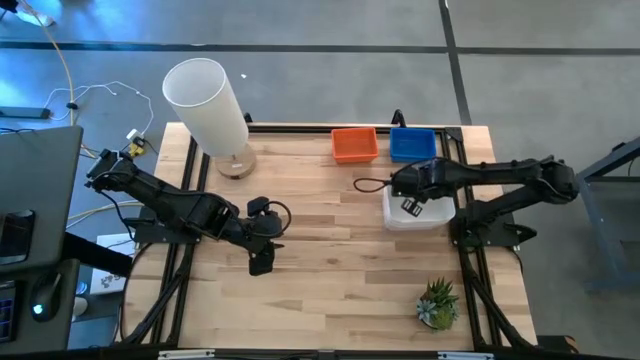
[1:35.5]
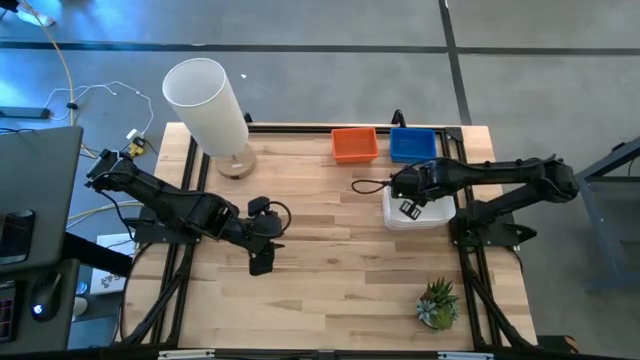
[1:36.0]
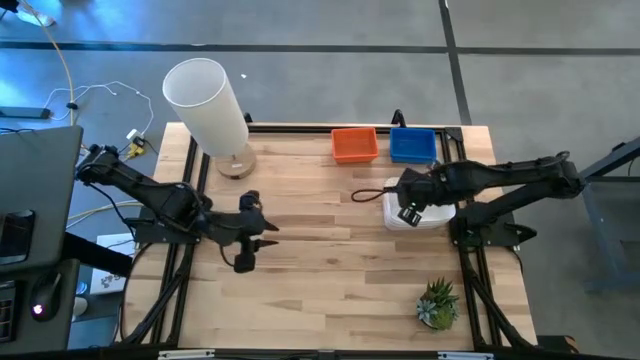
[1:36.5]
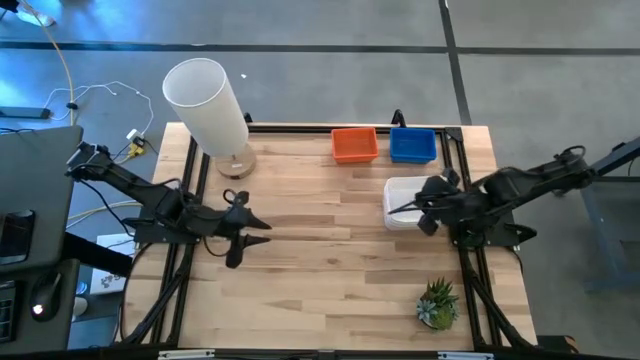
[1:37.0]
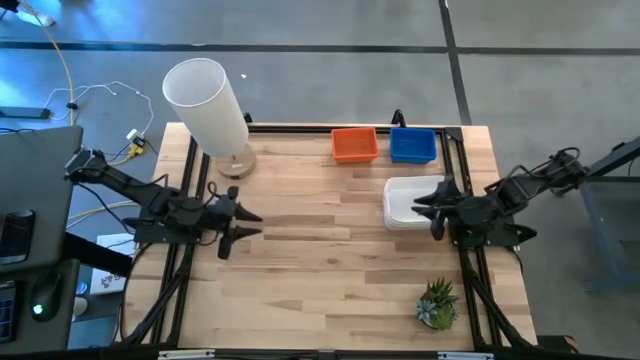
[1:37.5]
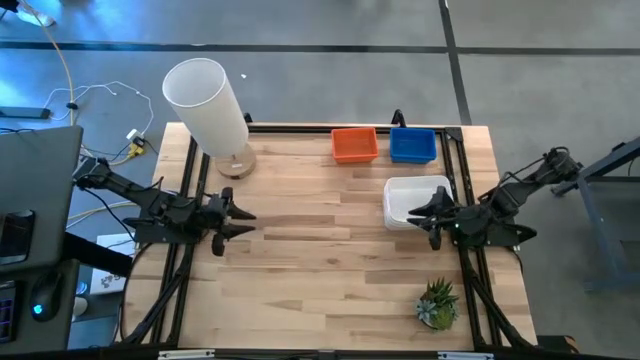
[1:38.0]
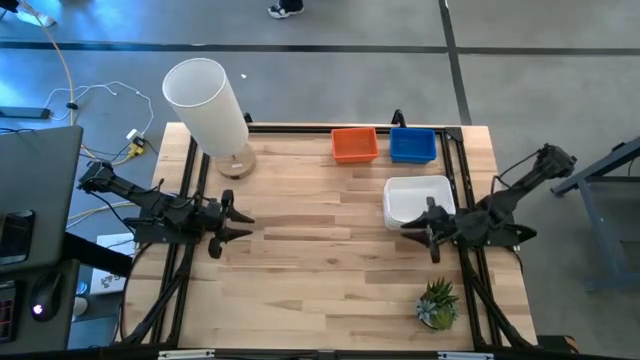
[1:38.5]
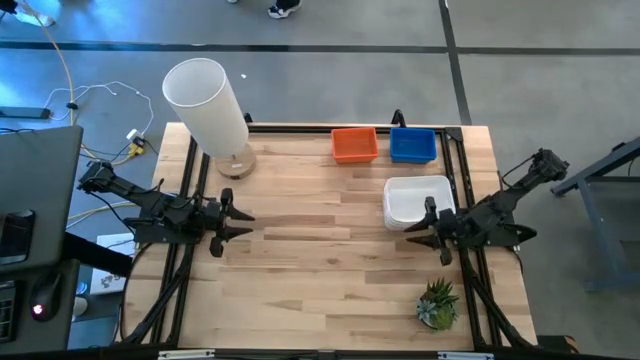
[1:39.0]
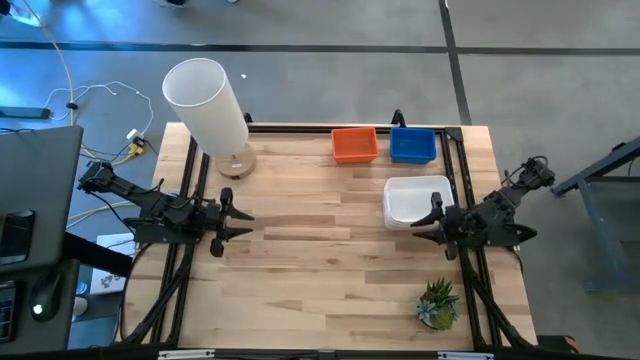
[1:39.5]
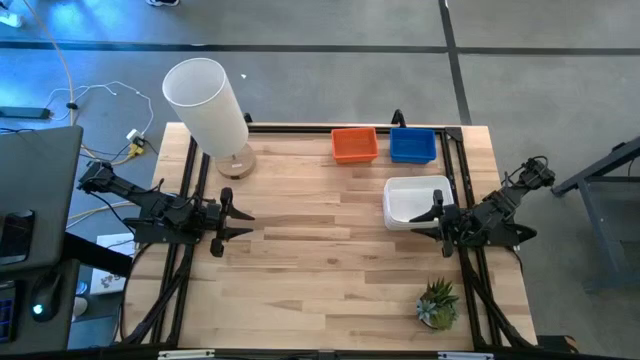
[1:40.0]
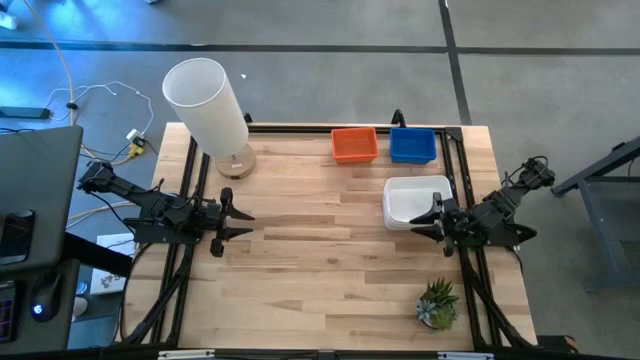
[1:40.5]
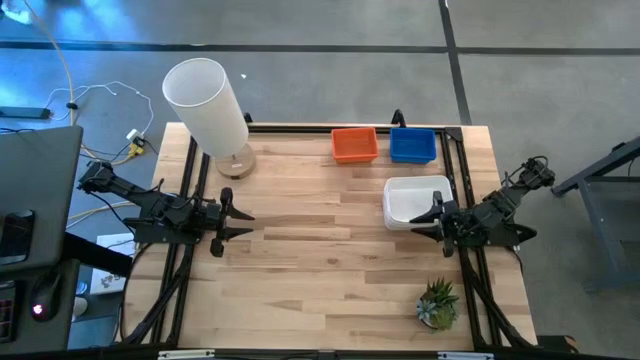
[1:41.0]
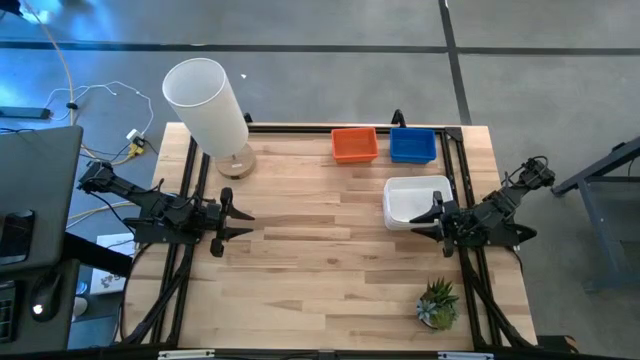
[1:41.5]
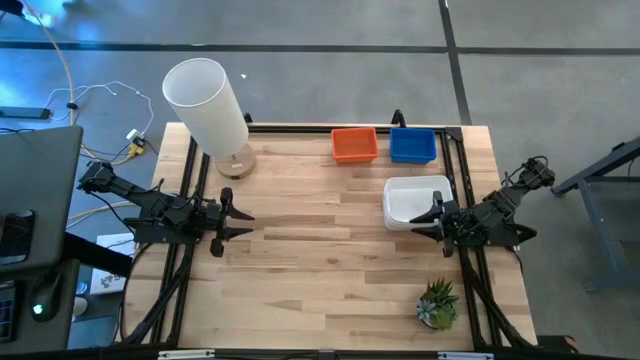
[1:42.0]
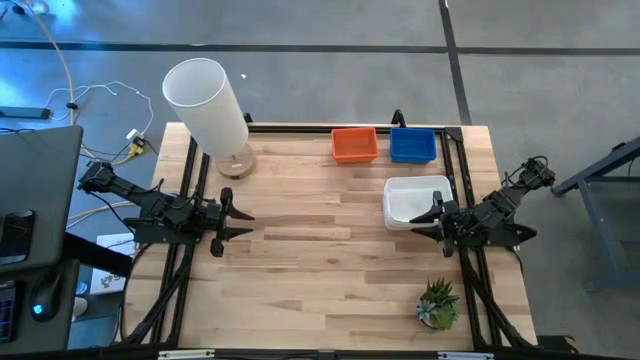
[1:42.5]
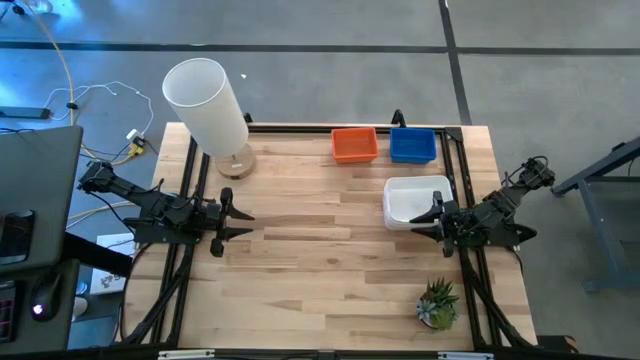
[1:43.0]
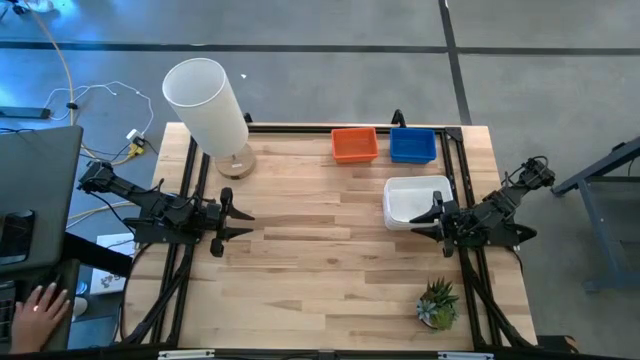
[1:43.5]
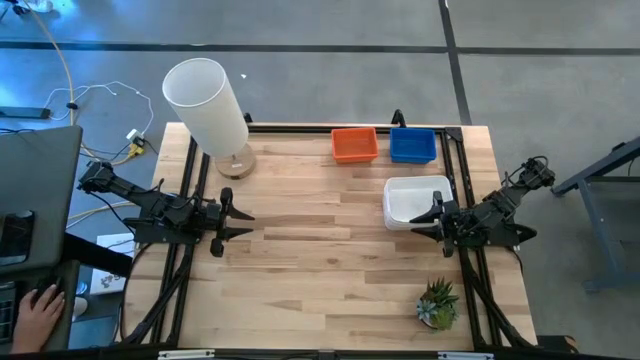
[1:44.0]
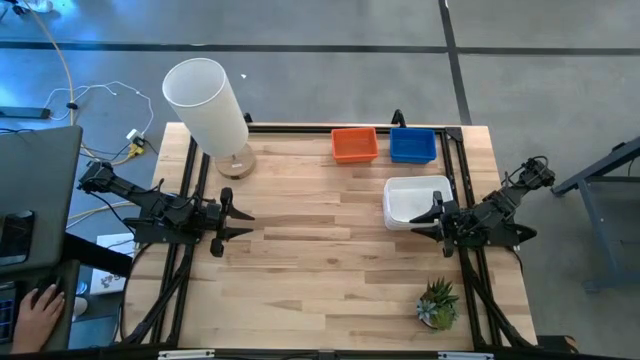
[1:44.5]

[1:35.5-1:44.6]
Return to Home Position

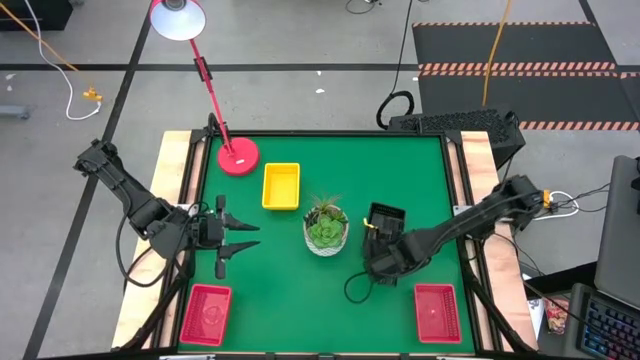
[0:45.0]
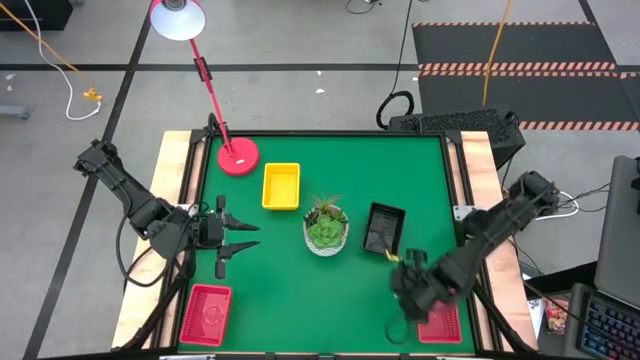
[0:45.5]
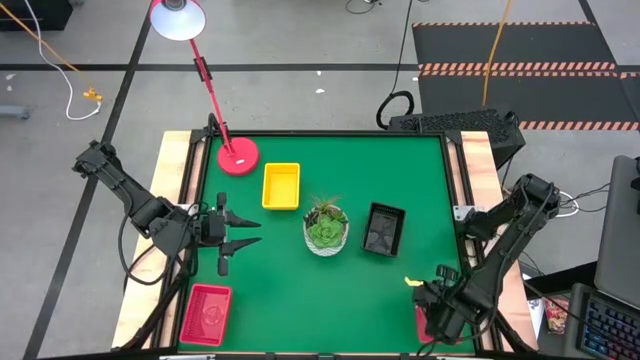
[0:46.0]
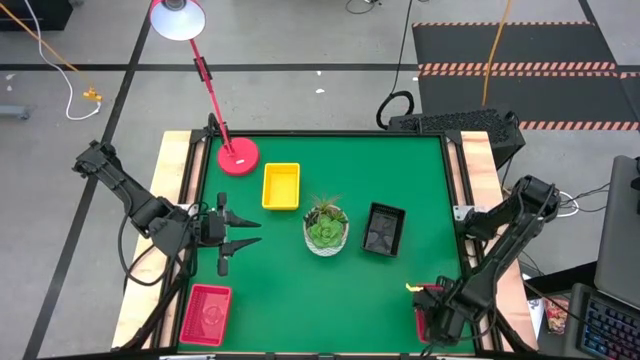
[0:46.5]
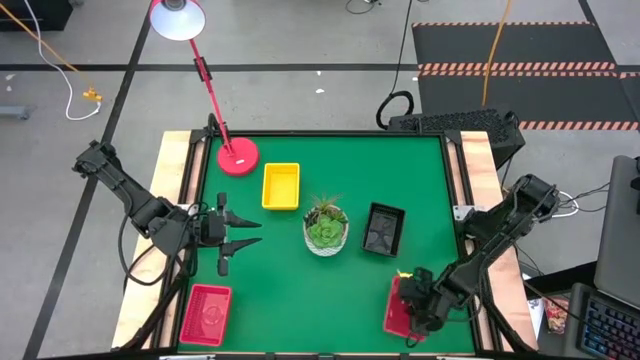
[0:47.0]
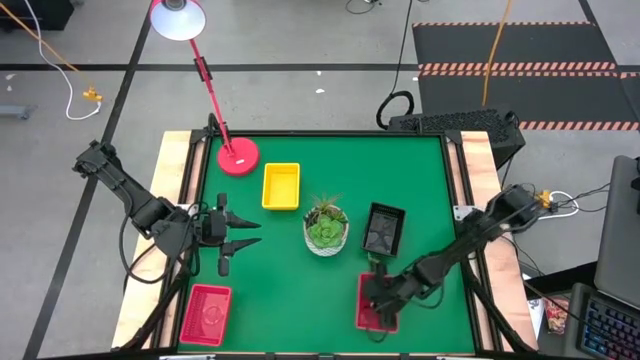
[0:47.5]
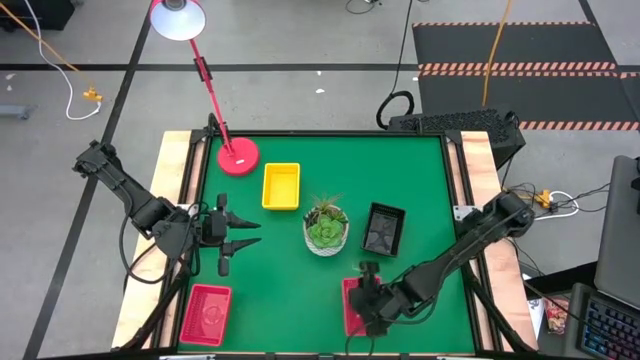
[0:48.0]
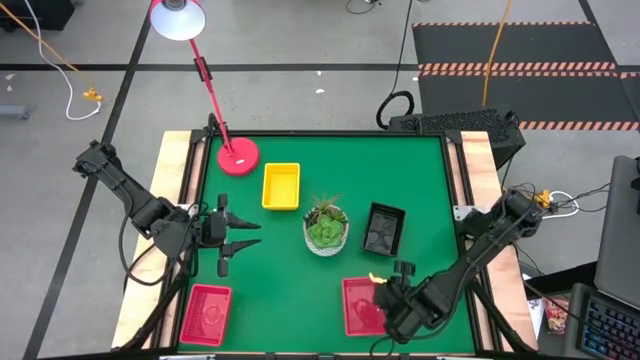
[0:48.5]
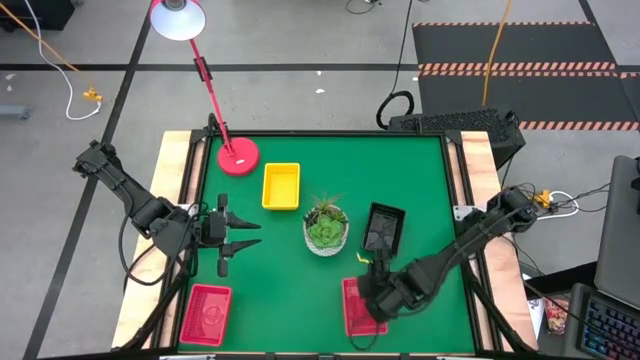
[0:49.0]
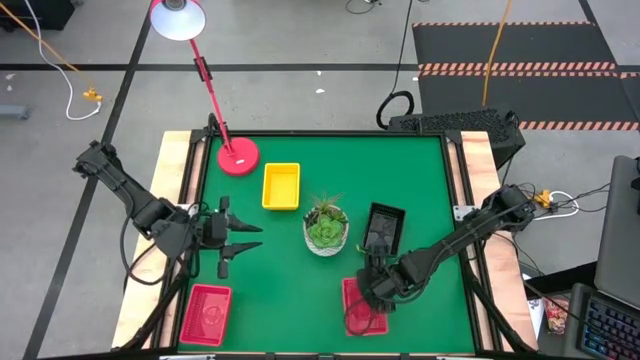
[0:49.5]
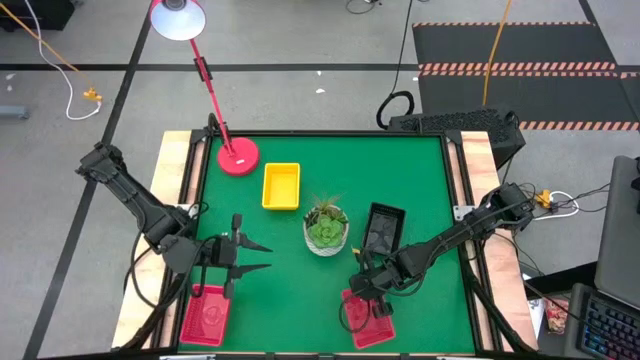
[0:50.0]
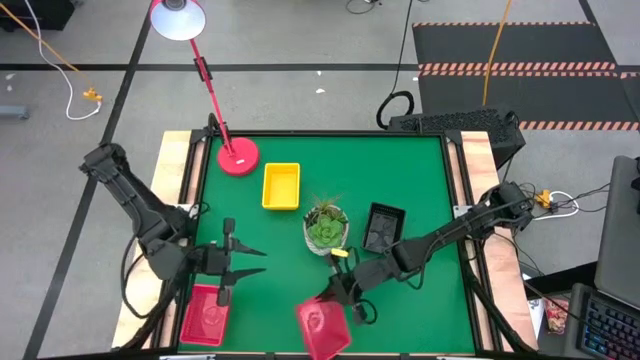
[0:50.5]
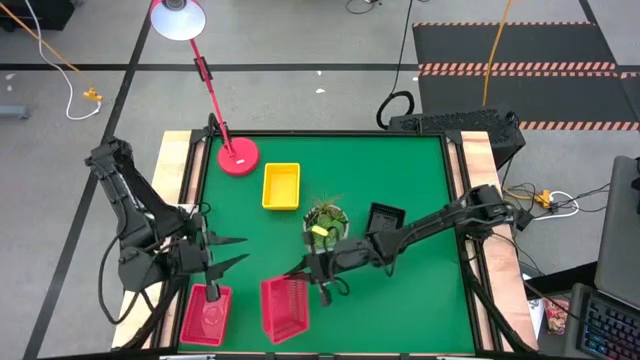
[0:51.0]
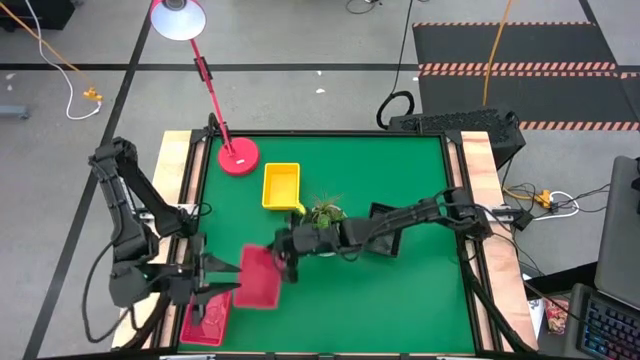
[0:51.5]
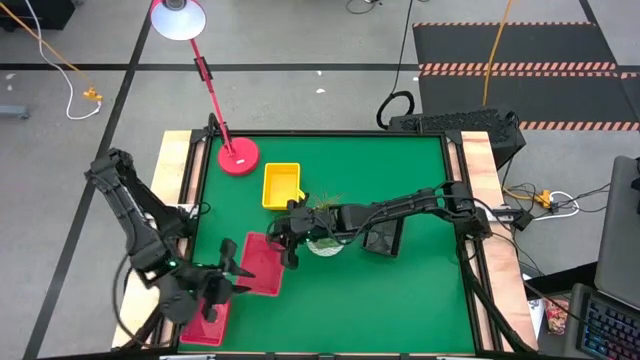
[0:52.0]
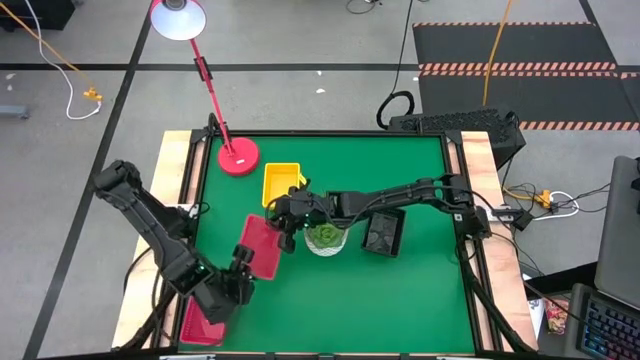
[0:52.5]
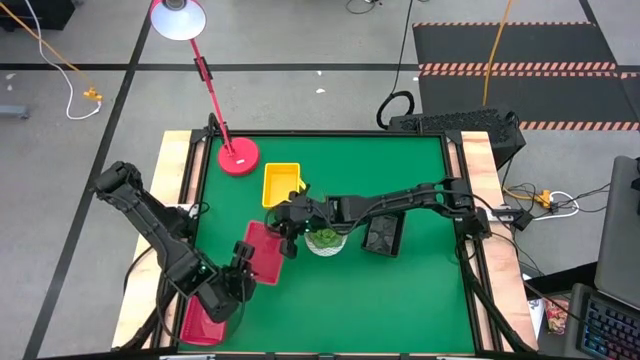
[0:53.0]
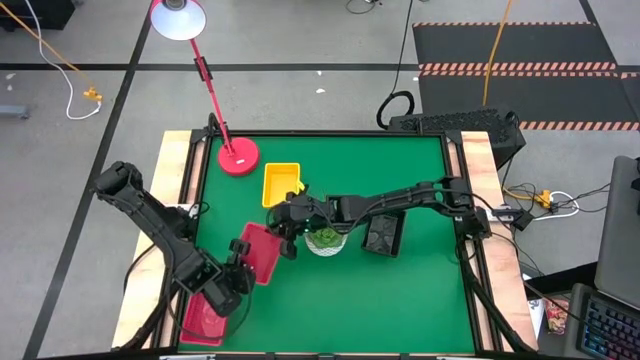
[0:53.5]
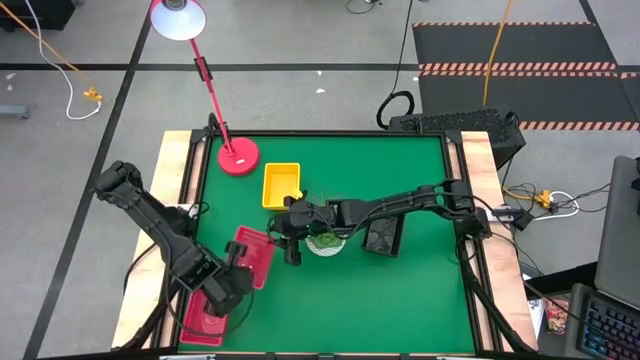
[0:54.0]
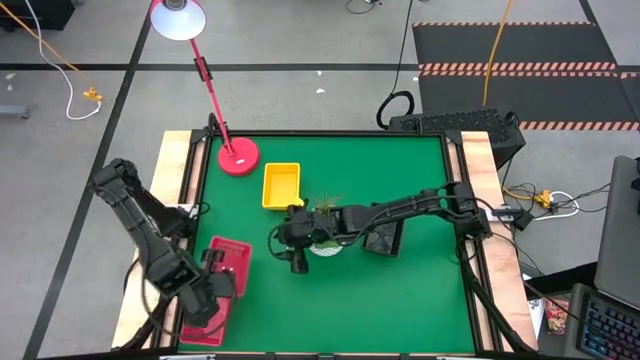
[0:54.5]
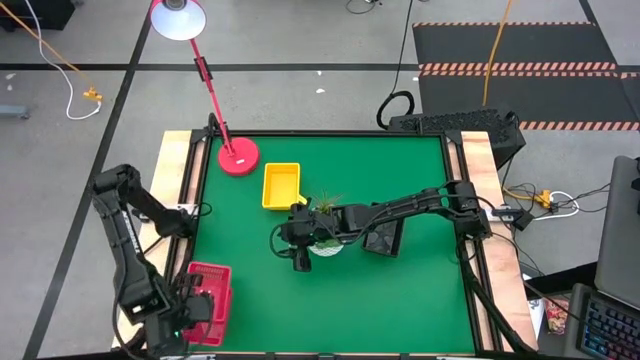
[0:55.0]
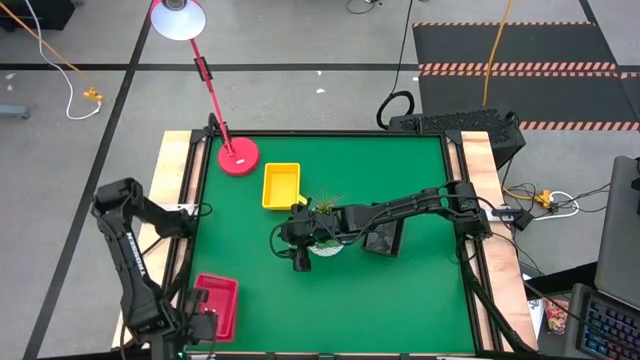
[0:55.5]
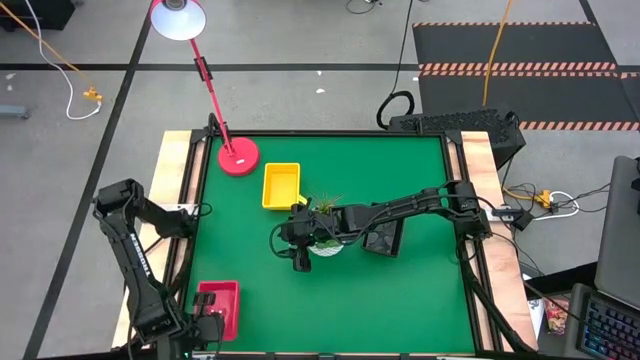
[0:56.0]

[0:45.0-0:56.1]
Stack the right red bin on top of the left red bin

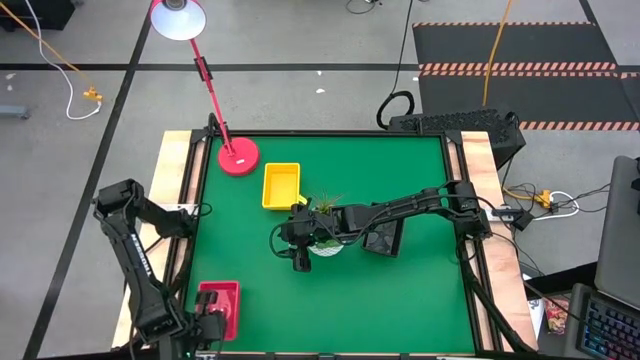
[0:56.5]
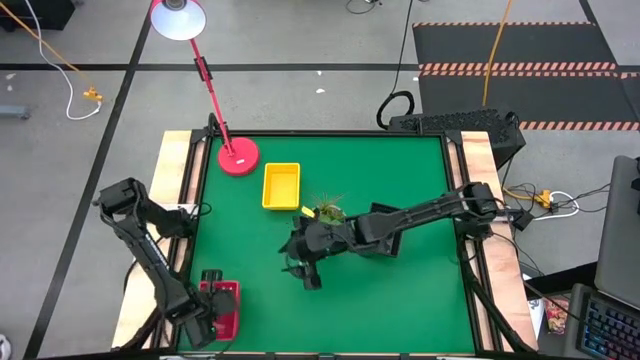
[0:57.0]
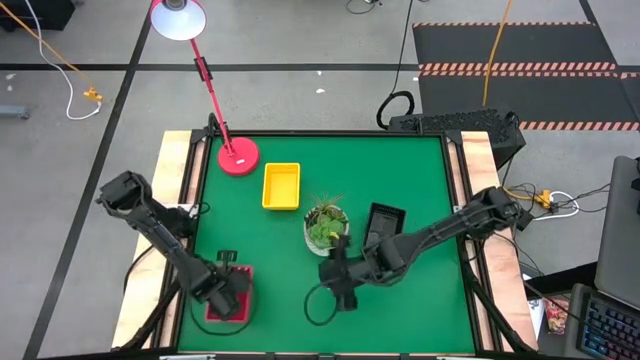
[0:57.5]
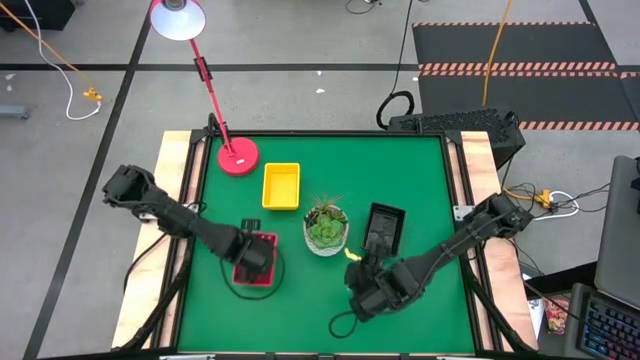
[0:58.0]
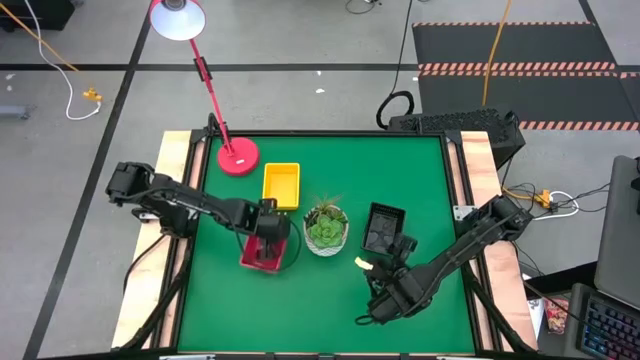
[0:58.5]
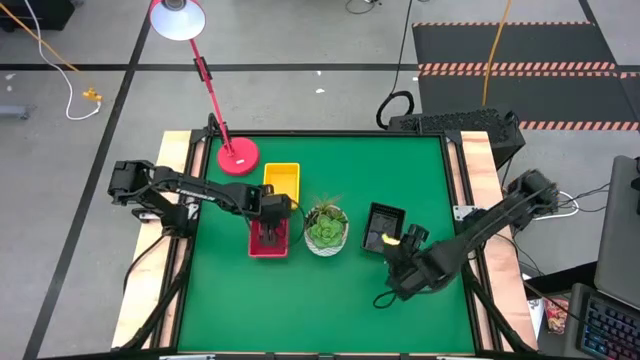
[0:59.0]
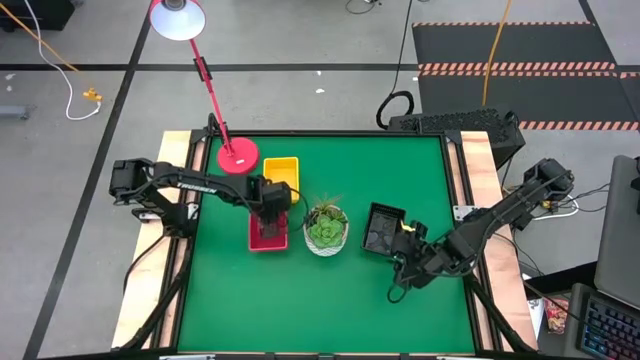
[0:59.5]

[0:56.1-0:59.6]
Move the stacked red bins to the middle of the table
